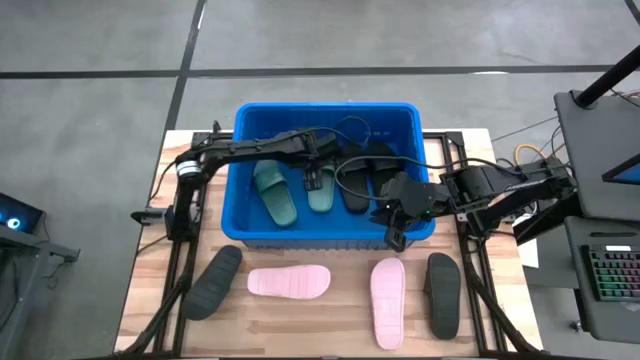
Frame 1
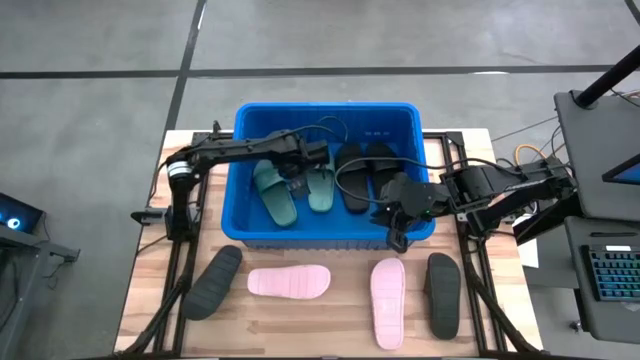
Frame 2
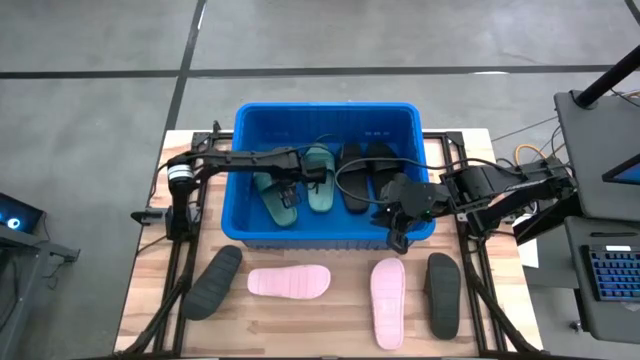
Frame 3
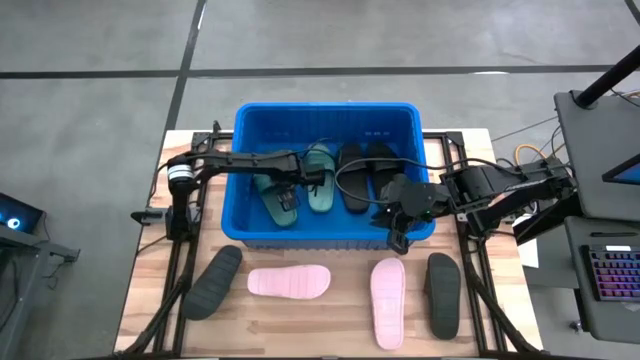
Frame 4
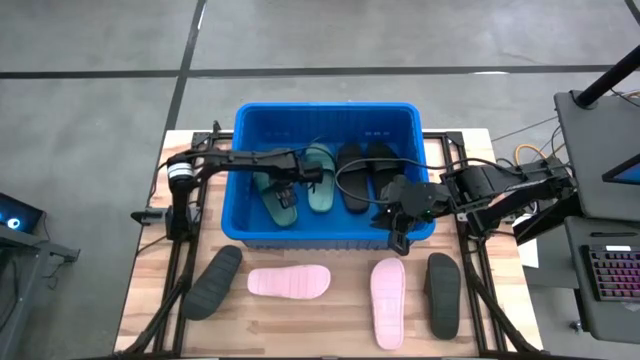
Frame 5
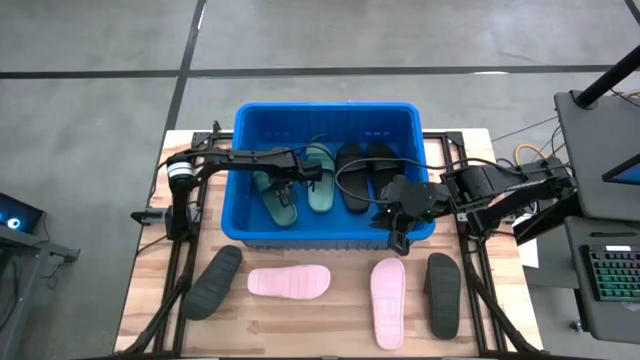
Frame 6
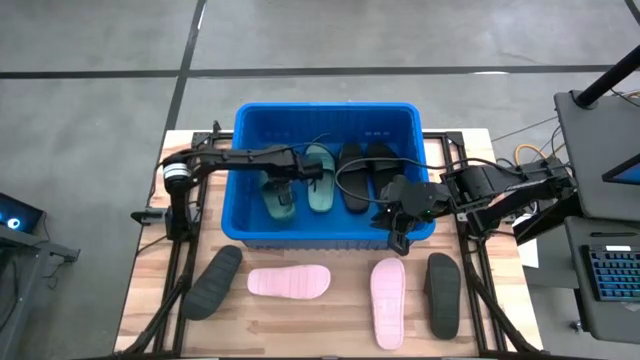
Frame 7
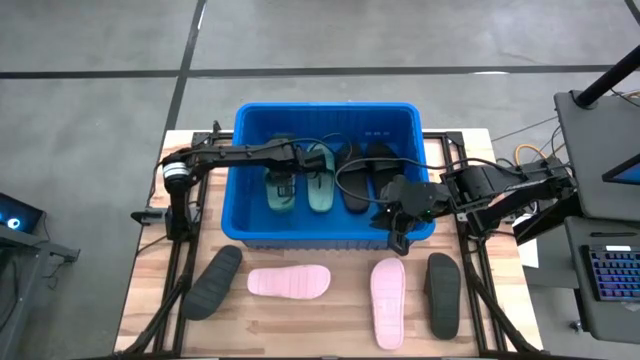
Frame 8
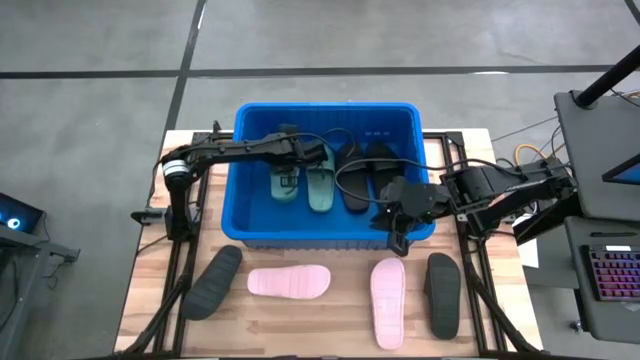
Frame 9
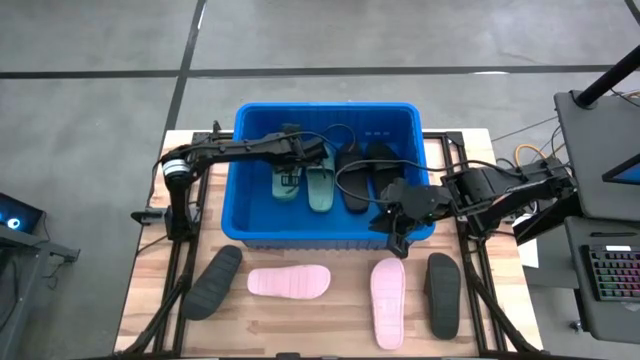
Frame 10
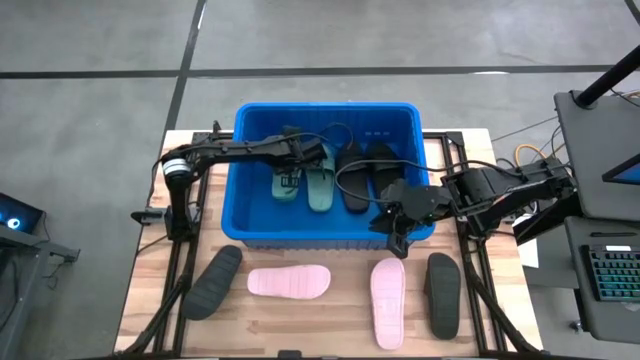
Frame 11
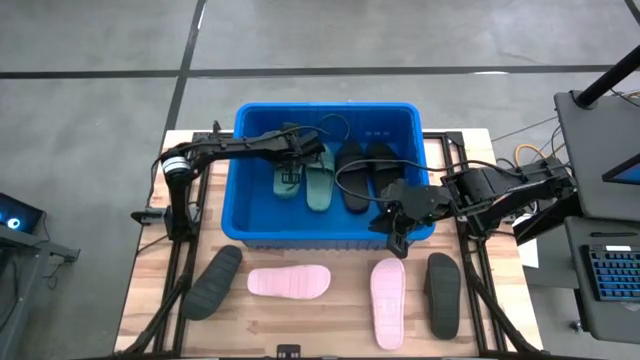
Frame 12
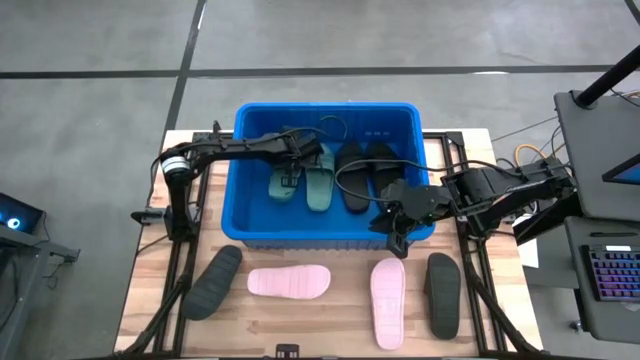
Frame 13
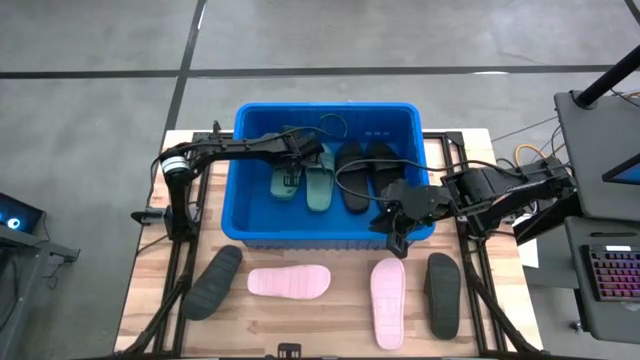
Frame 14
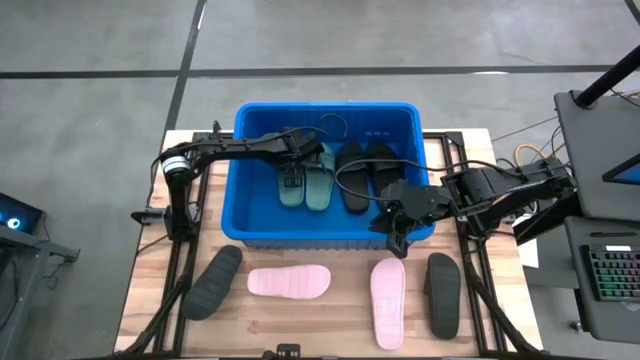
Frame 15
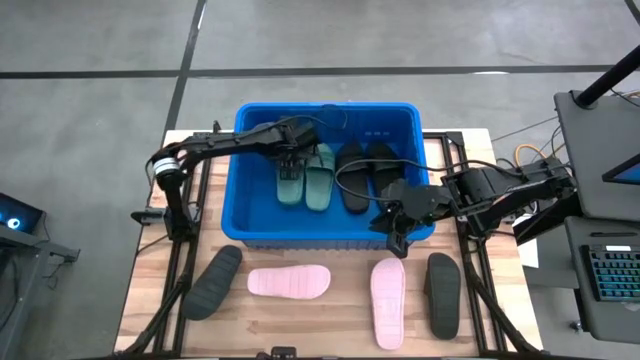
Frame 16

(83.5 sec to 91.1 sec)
Task: Pick and place slides into bin
Adjust the green slide in the bin

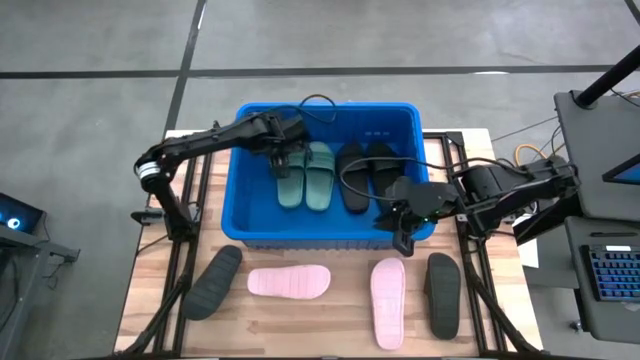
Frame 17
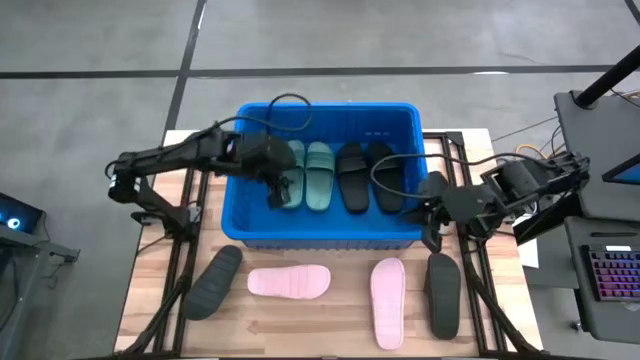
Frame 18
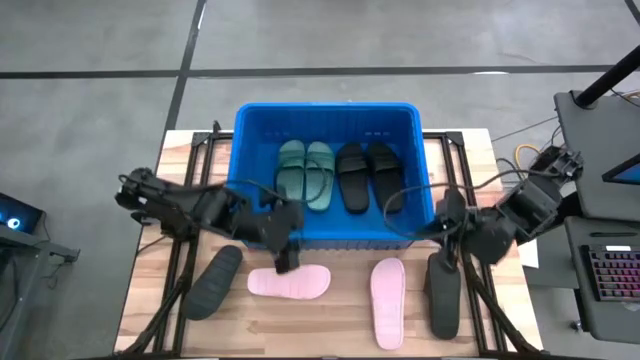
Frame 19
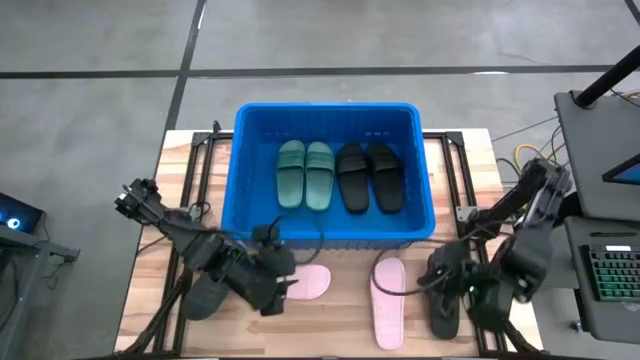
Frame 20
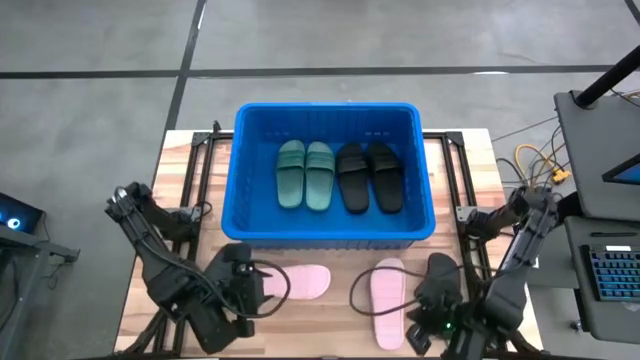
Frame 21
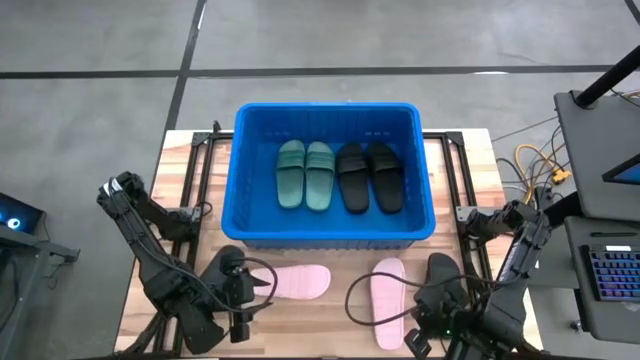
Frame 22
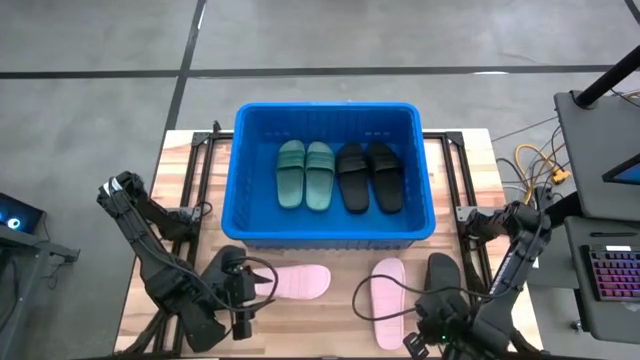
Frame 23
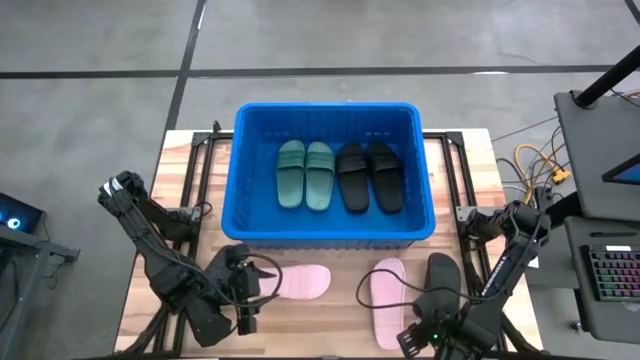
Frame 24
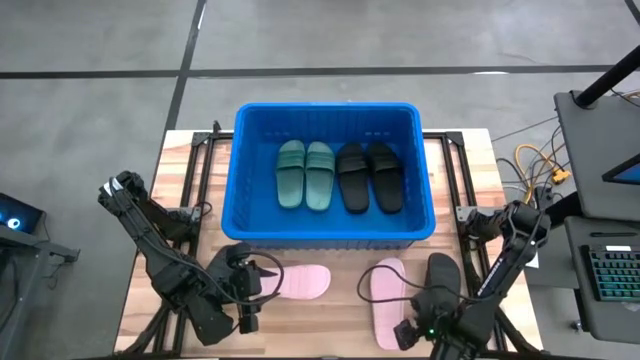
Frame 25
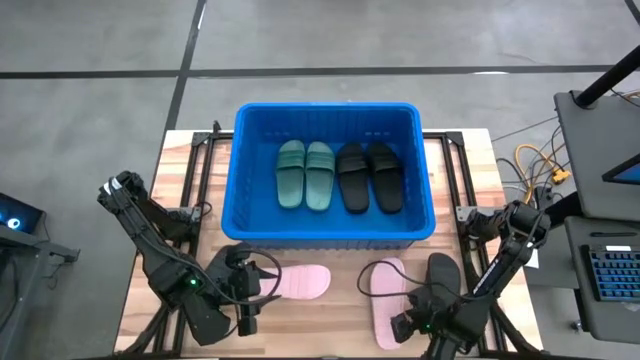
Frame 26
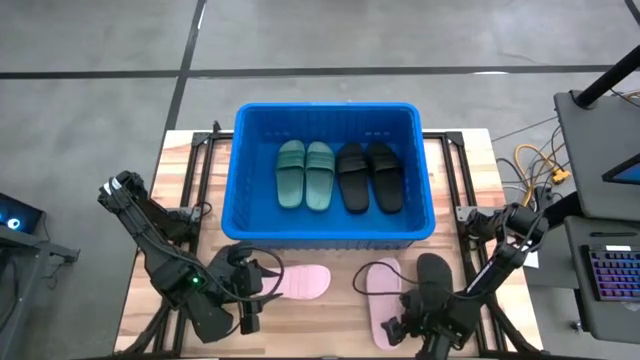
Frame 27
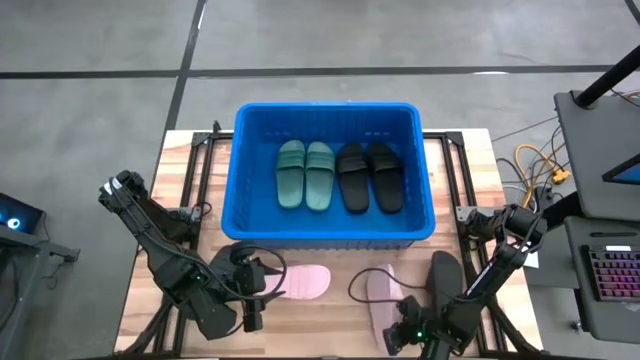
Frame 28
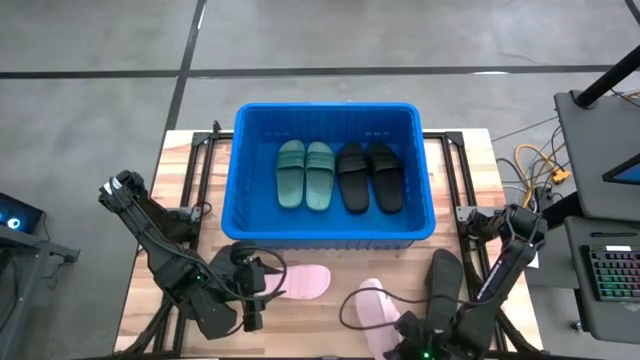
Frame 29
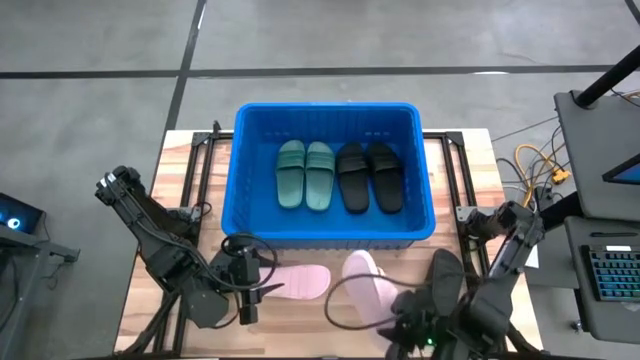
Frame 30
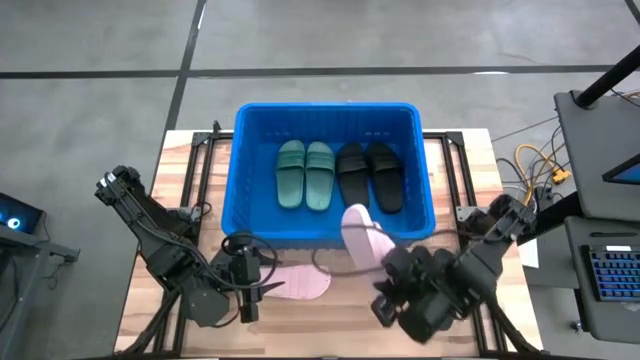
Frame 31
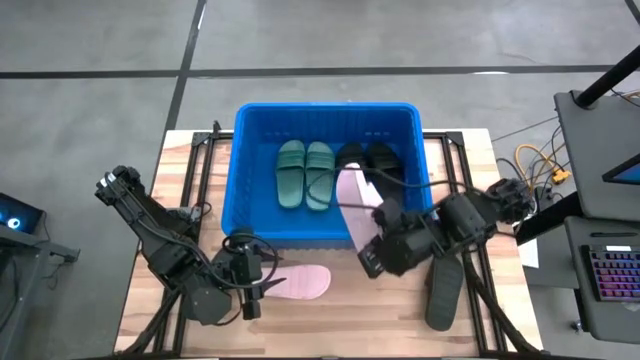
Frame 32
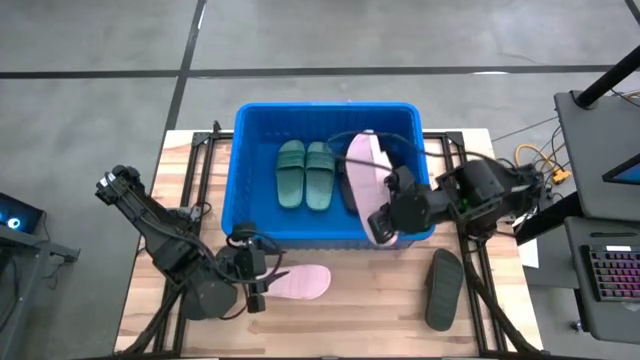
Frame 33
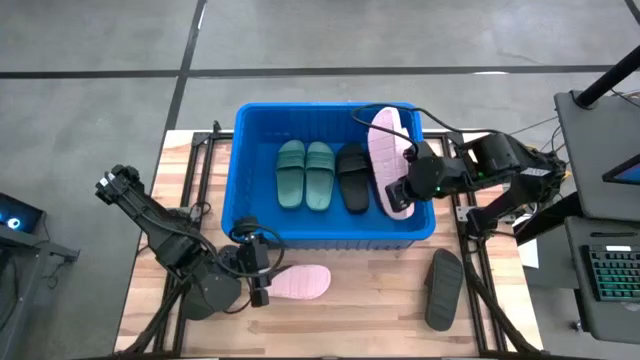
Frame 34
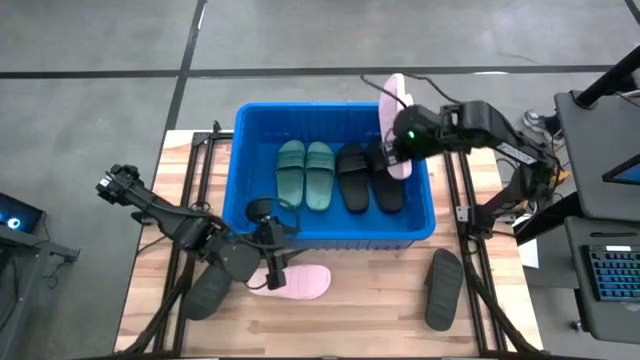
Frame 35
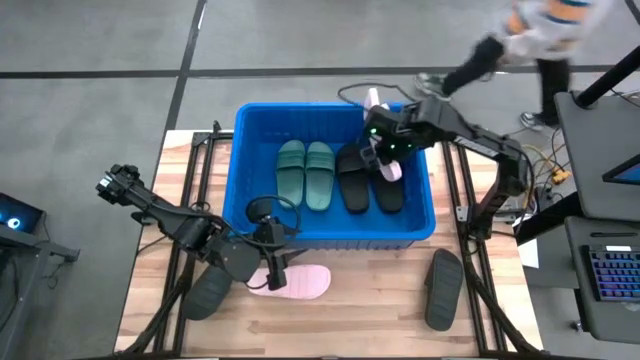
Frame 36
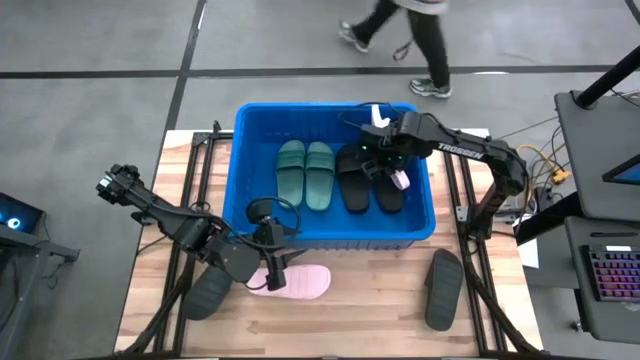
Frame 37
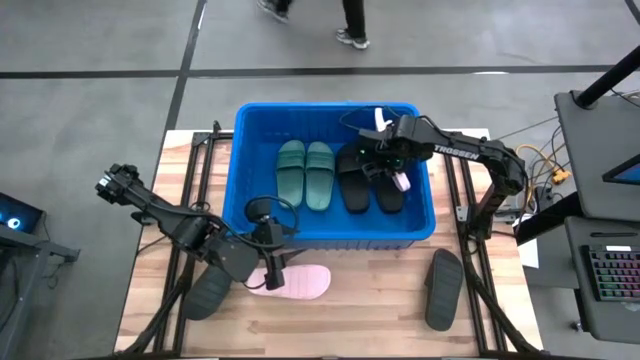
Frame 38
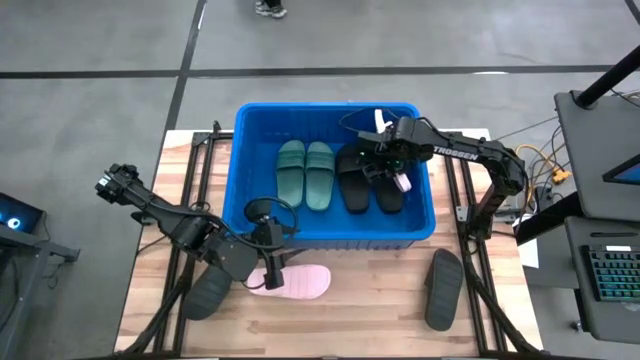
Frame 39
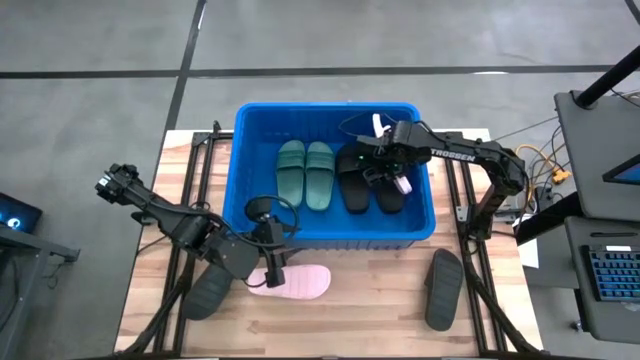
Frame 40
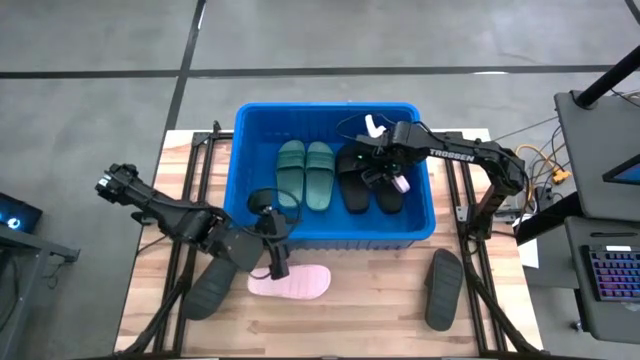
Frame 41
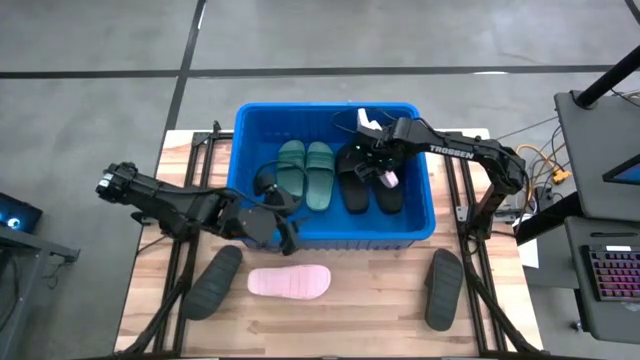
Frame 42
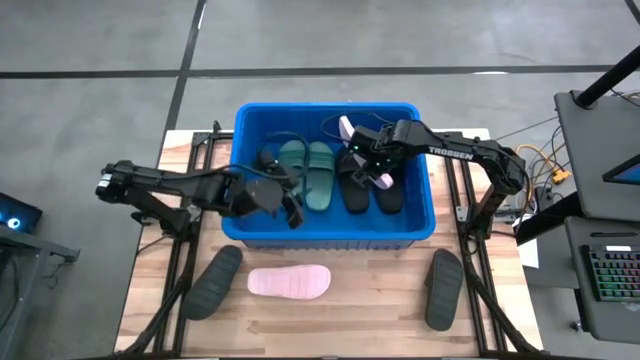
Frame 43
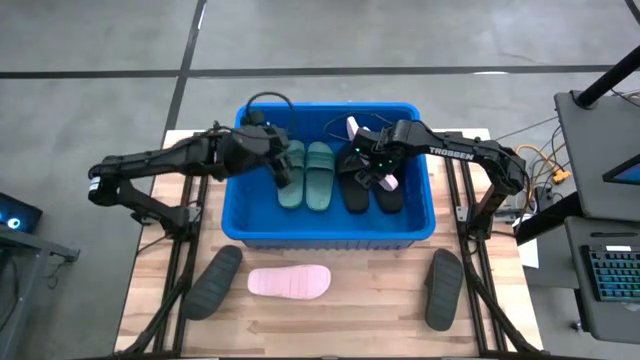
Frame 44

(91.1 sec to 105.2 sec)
Put the right pink slide into the bin
